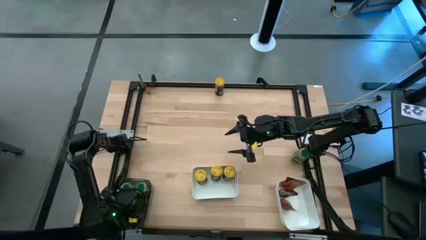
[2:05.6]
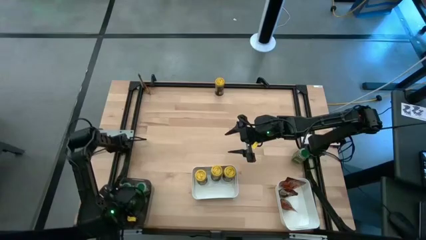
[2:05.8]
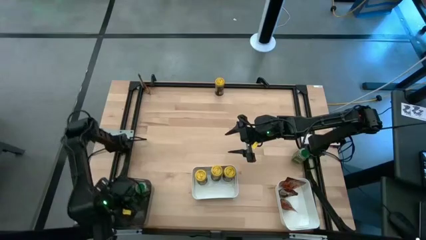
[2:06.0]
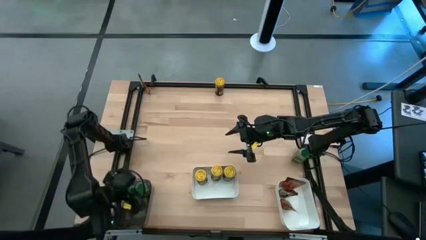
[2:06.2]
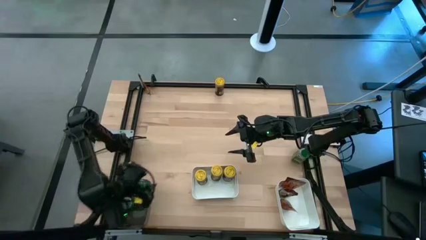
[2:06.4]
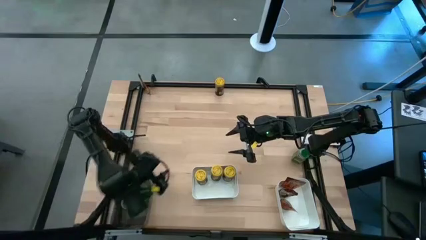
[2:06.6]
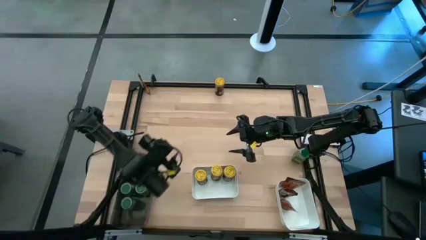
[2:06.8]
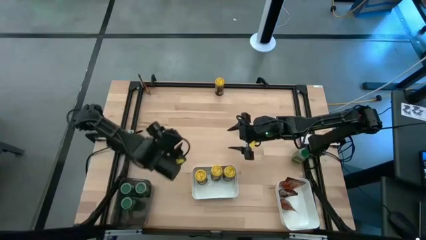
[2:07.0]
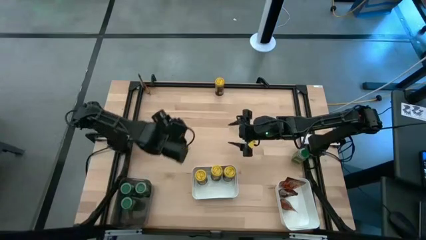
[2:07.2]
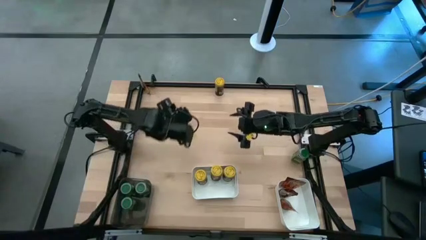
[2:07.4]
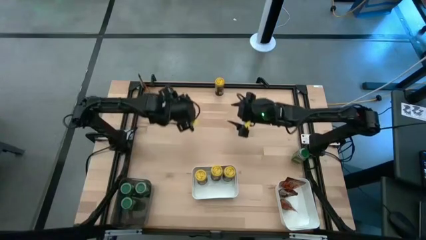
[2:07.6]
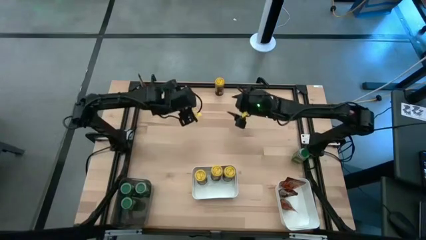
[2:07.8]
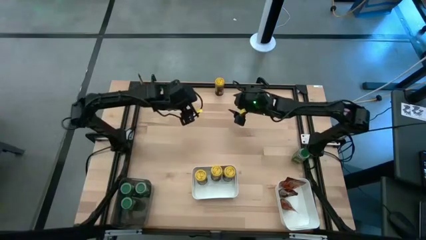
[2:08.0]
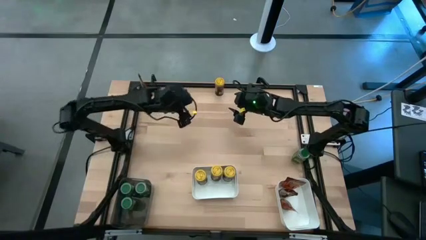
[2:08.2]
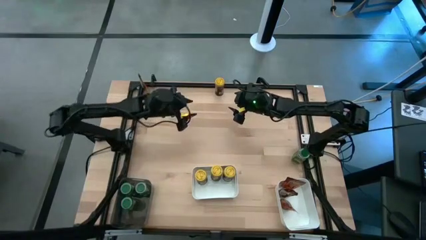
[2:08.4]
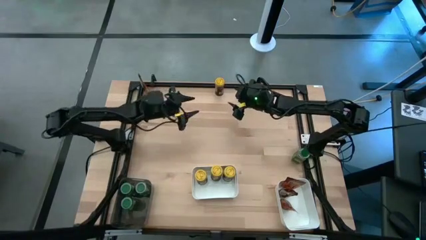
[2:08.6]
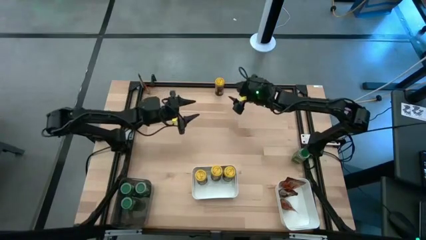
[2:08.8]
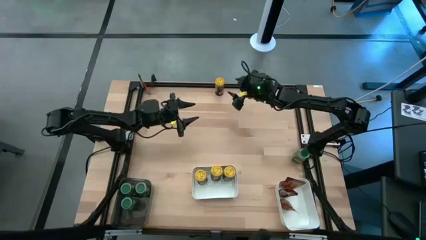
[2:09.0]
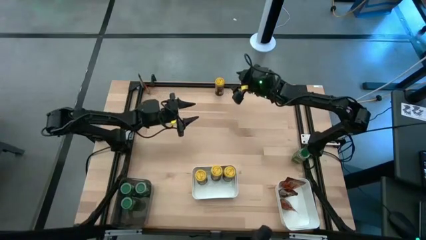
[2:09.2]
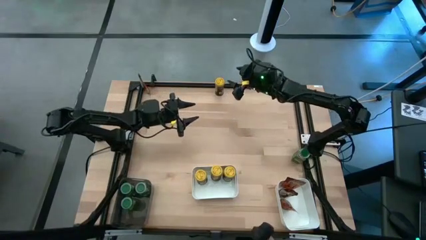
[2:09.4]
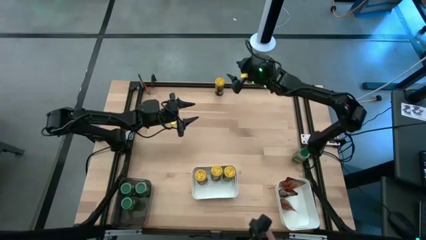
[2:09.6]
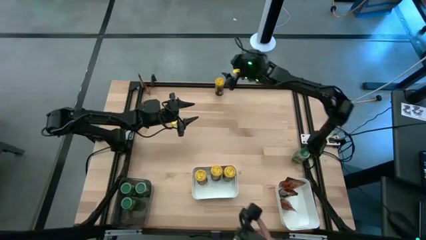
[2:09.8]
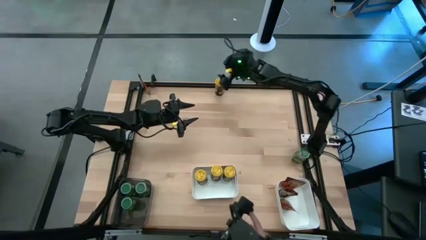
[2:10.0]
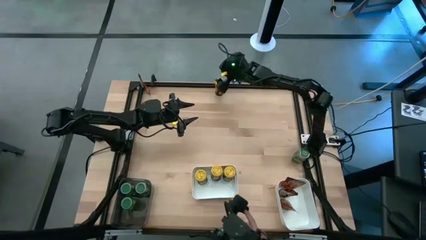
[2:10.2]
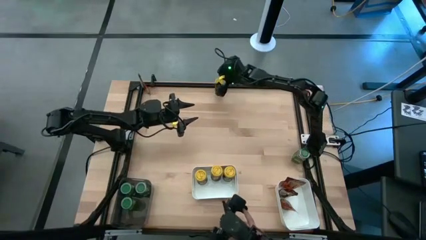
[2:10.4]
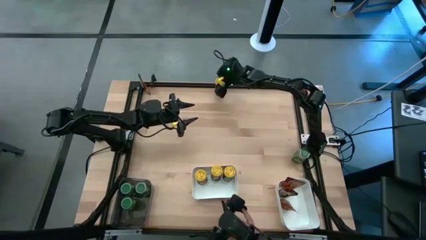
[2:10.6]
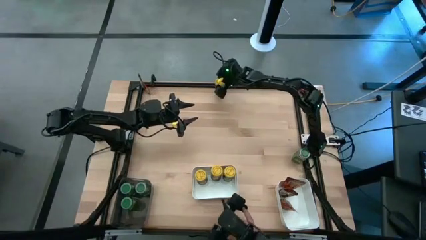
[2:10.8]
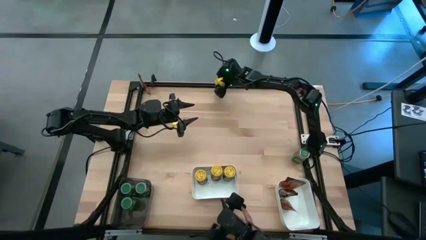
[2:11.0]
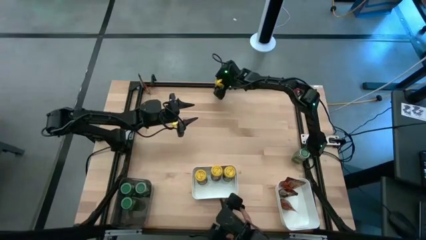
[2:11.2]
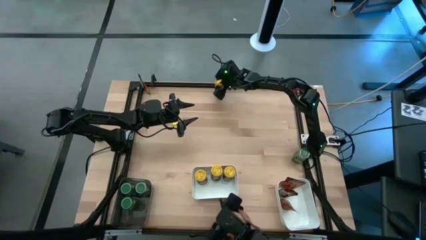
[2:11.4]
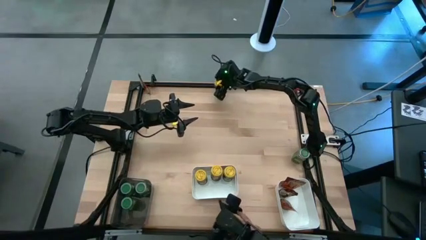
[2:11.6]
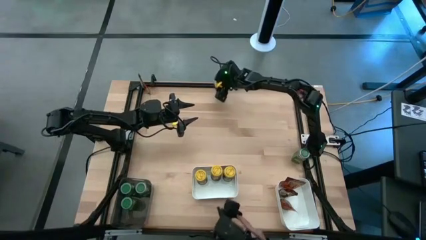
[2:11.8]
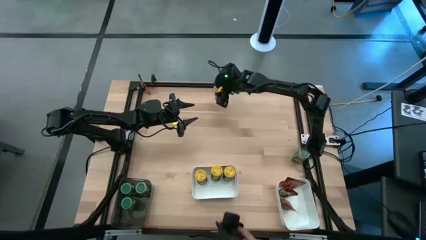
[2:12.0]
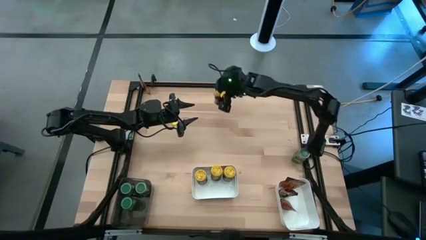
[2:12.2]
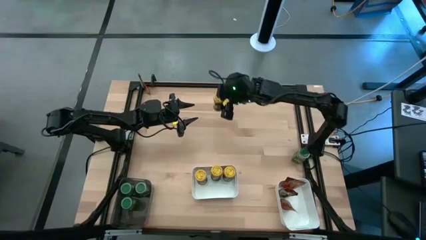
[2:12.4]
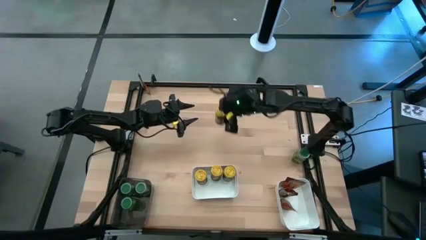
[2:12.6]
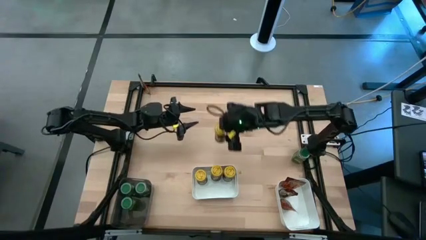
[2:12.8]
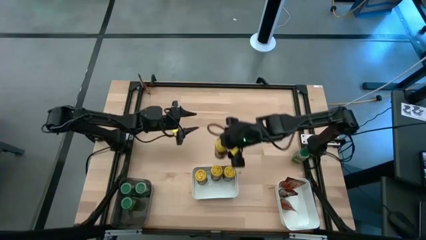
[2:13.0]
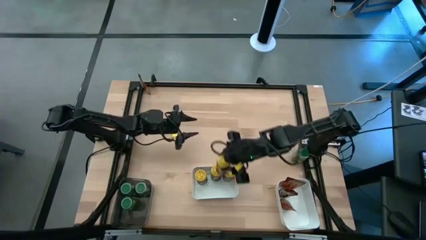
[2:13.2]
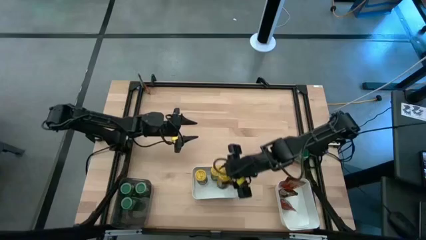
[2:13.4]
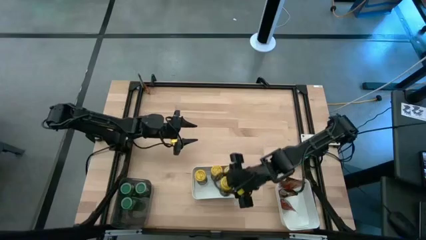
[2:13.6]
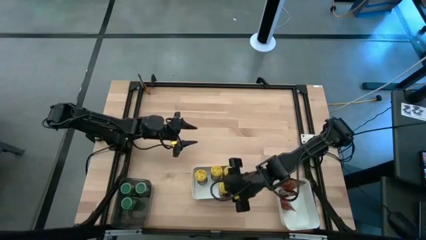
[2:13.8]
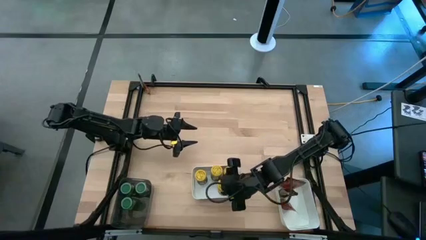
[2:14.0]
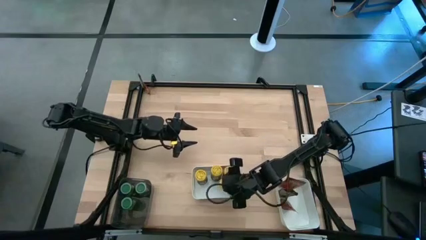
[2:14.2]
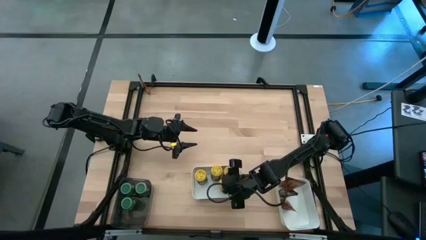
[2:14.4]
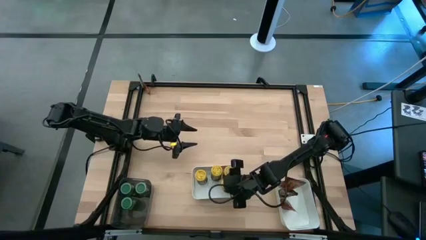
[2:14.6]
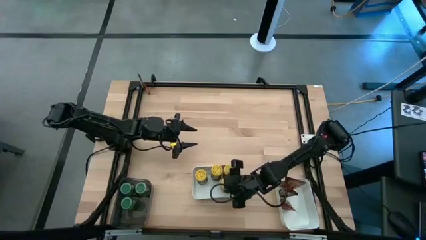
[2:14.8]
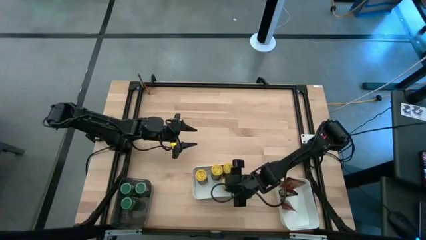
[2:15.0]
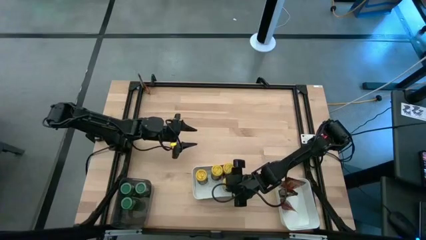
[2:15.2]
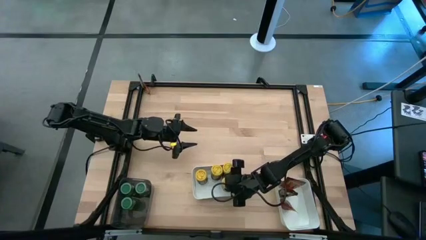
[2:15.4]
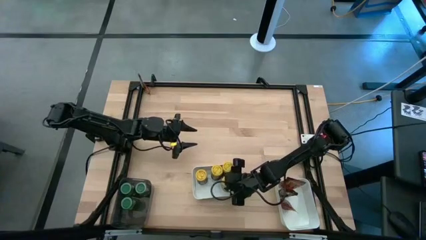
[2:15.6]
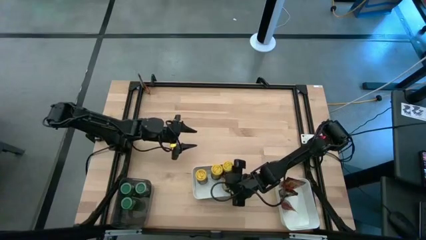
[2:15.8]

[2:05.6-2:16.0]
Task: Sort spices by type
Put the yellow seasoning bottle into the left white bin

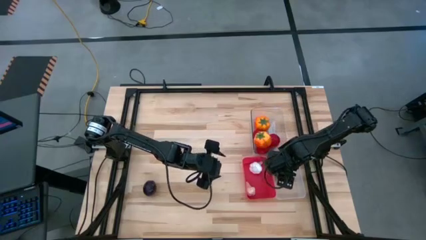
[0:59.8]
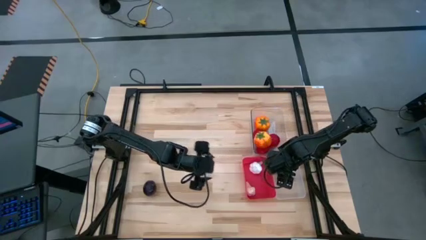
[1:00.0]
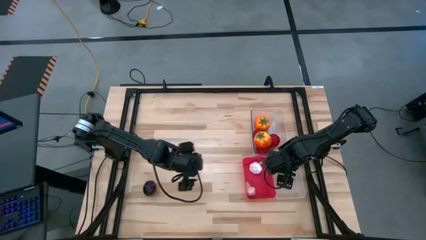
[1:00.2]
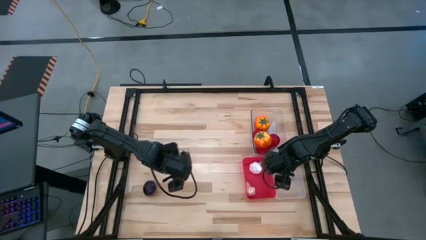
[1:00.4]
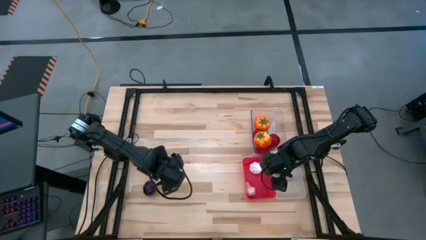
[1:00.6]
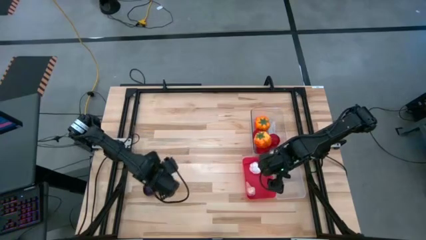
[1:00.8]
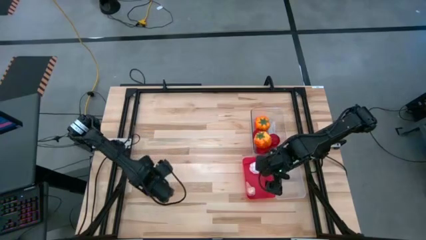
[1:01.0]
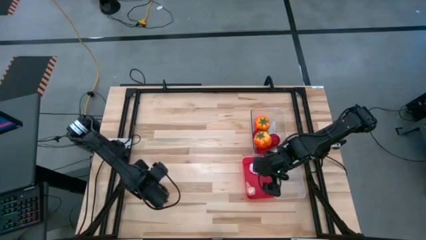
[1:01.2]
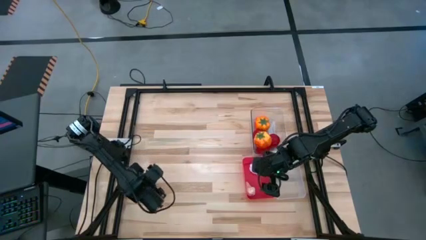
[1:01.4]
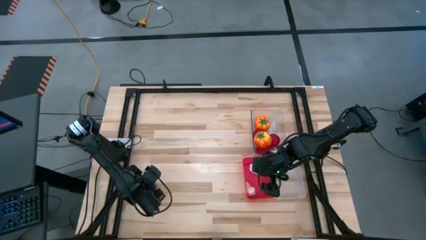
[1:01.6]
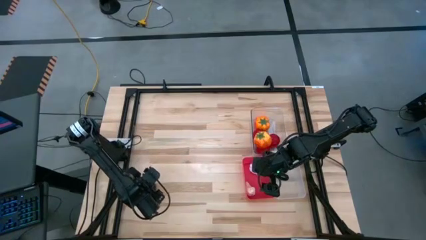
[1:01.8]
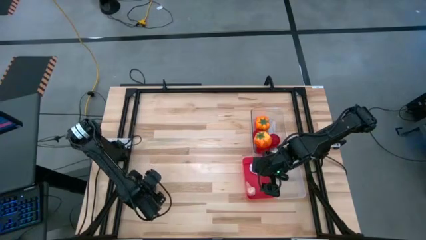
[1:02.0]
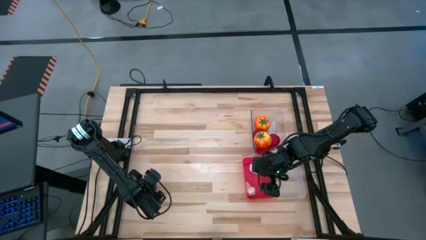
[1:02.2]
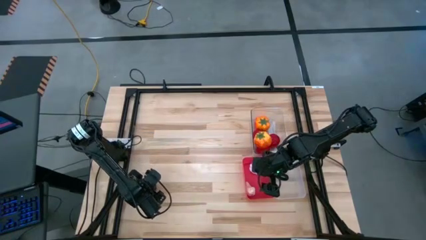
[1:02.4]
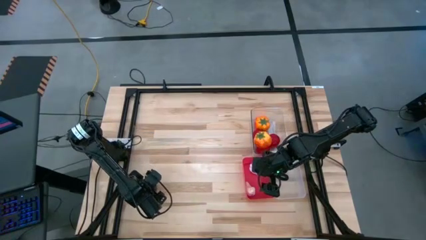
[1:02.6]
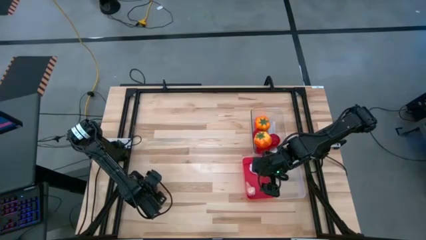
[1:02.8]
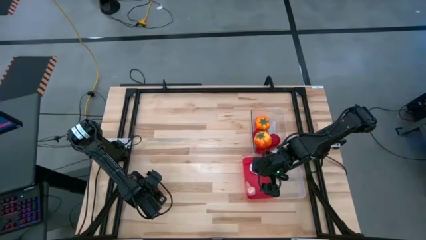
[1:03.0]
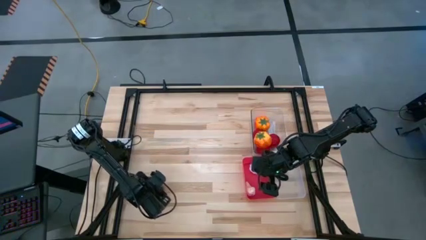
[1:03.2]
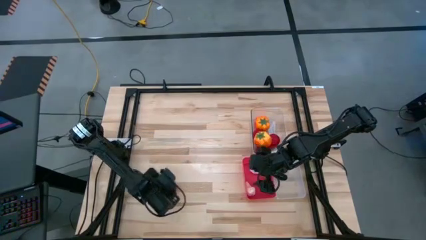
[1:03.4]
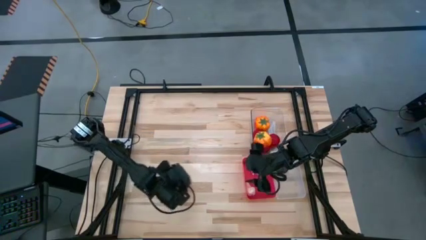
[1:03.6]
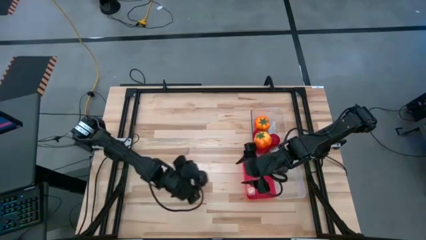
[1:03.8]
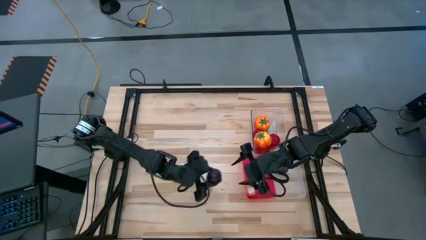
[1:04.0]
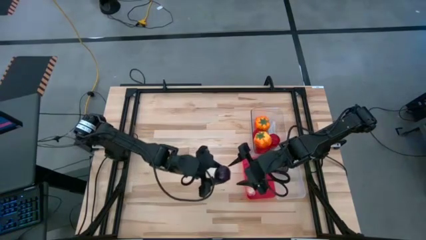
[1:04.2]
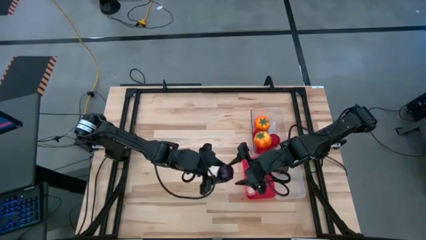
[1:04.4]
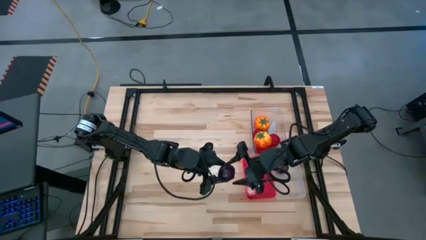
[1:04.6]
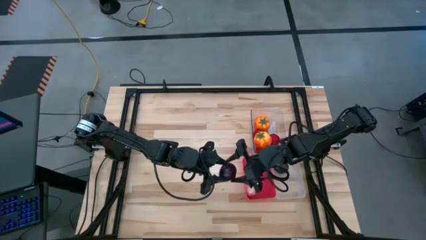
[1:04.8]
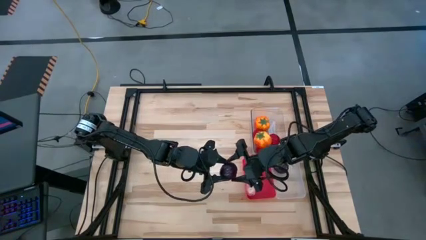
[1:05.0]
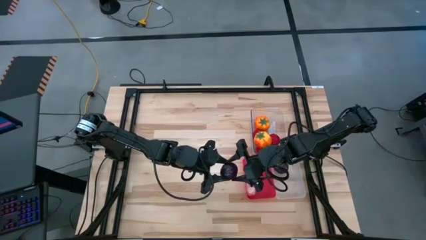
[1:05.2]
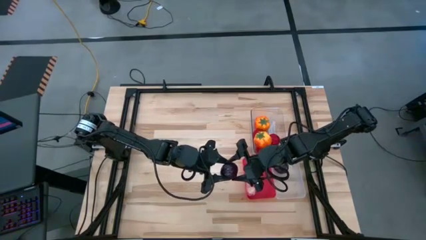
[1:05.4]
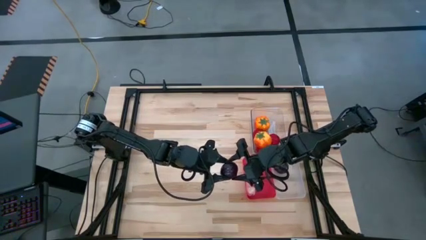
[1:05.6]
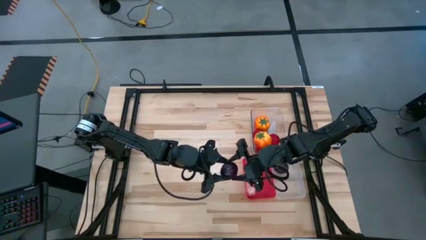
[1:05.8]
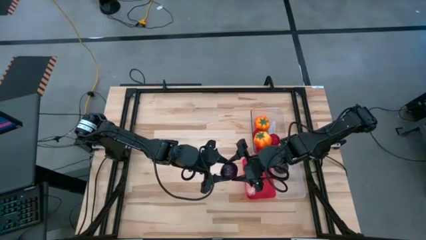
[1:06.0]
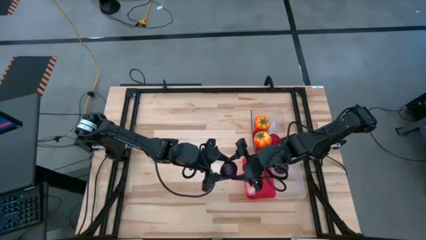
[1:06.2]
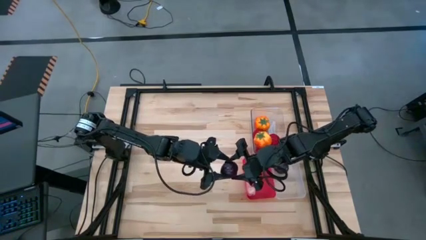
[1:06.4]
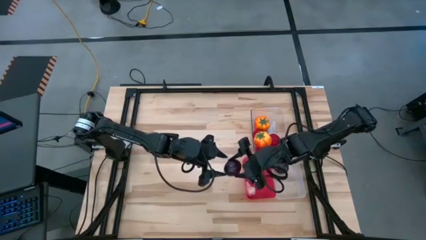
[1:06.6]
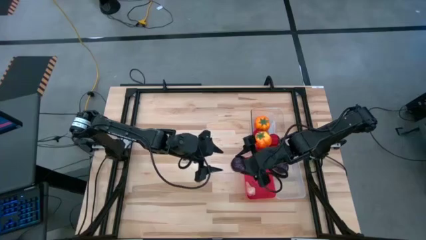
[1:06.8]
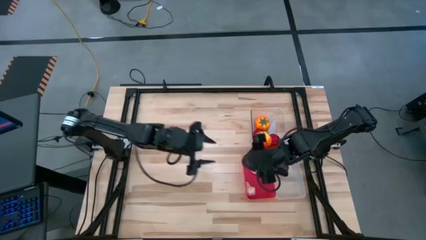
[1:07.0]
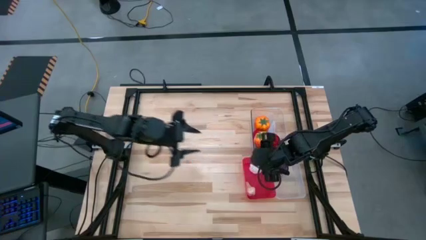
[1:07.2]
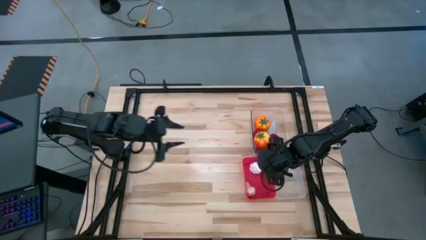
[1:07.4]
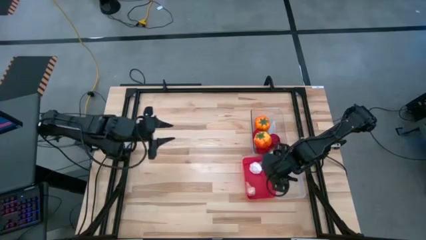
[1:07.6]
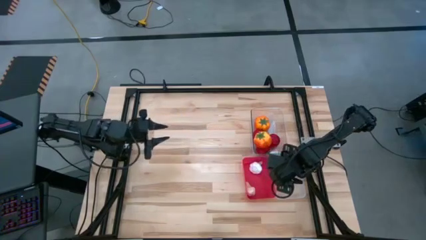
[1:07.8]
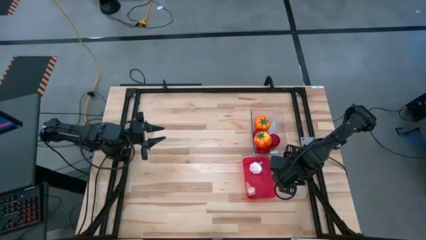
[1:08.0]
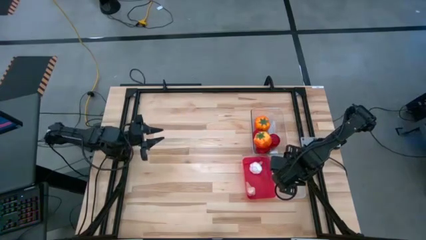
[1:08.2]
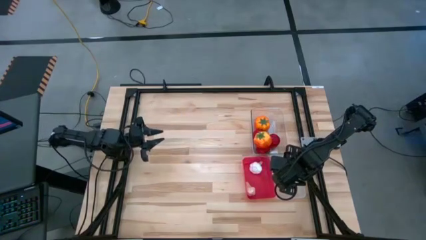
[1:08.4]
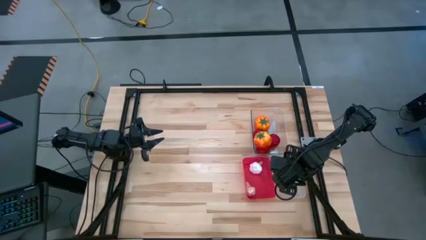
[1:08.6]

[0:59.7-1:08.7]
Task: Sort produce into baskets
Put the plum into the bottom transparent bin
